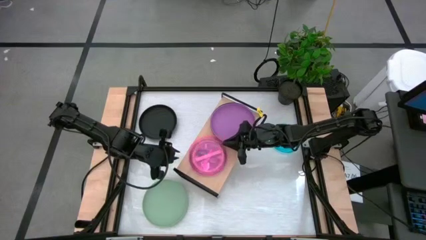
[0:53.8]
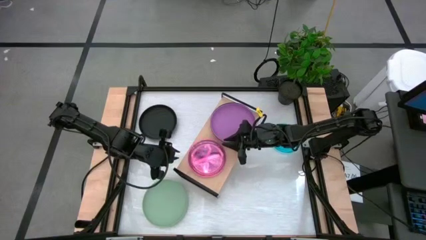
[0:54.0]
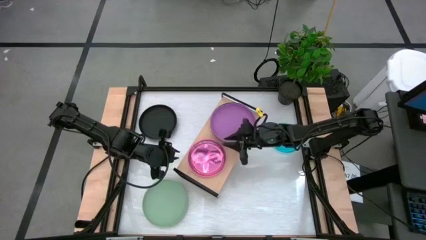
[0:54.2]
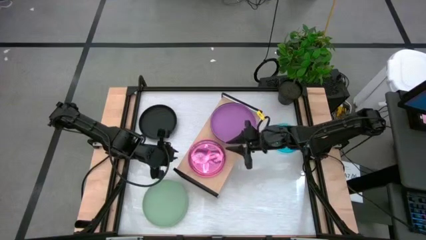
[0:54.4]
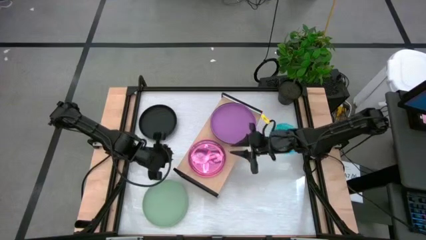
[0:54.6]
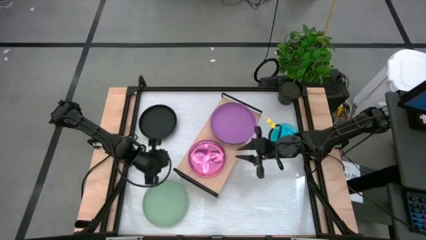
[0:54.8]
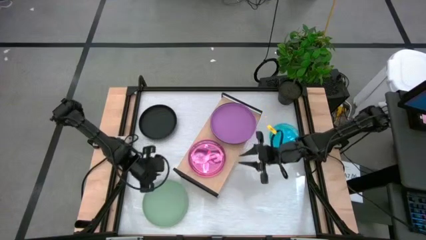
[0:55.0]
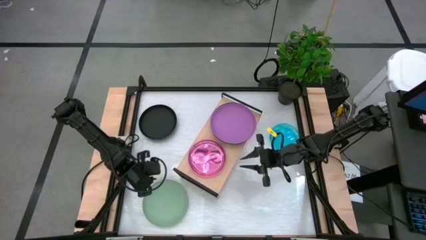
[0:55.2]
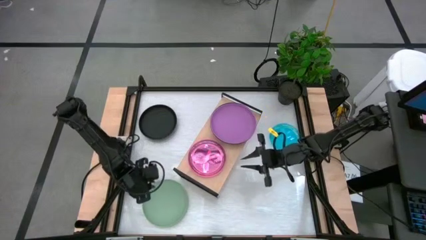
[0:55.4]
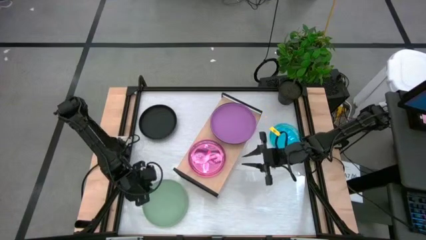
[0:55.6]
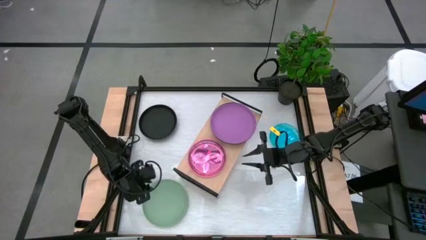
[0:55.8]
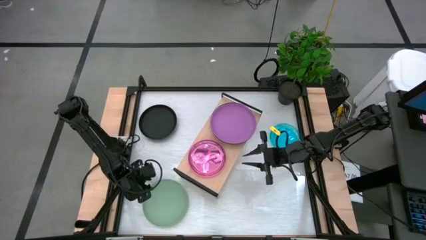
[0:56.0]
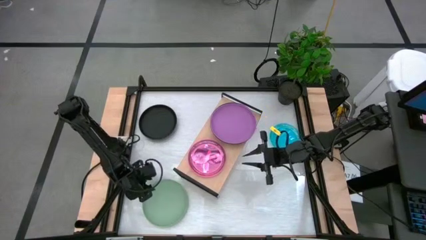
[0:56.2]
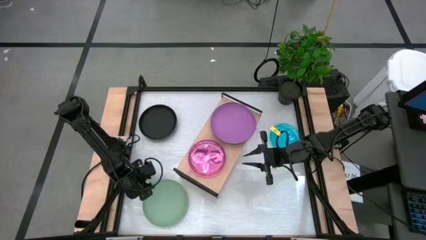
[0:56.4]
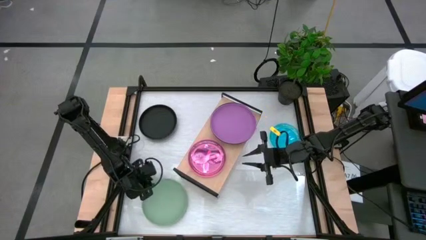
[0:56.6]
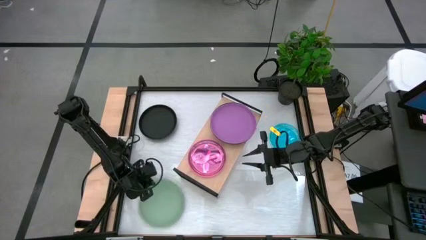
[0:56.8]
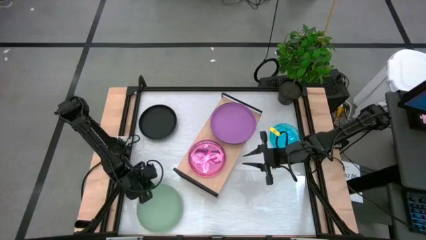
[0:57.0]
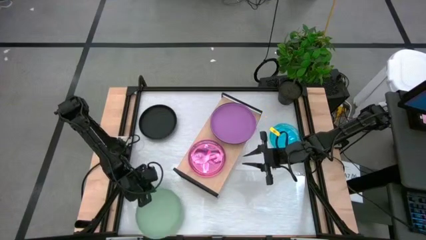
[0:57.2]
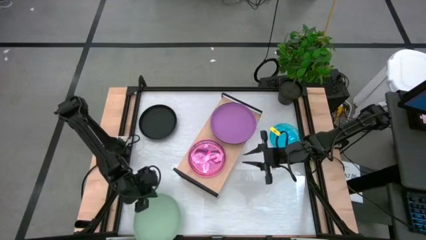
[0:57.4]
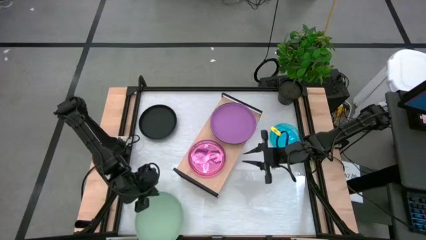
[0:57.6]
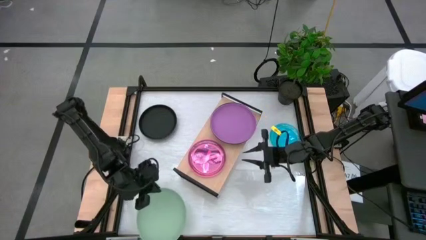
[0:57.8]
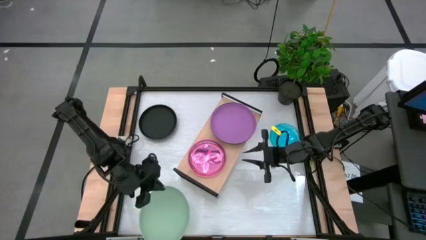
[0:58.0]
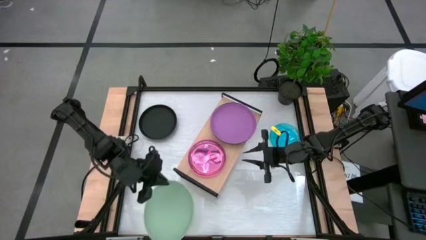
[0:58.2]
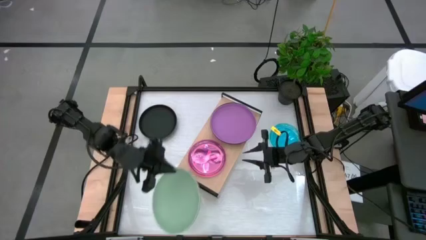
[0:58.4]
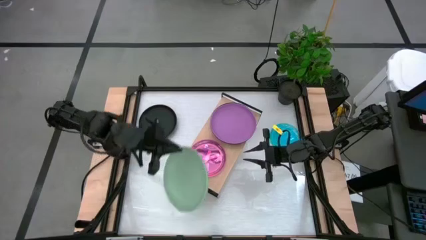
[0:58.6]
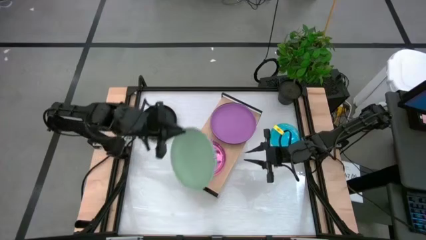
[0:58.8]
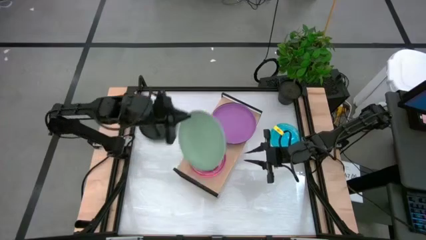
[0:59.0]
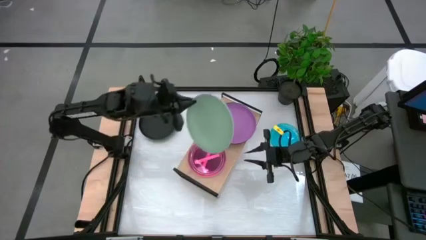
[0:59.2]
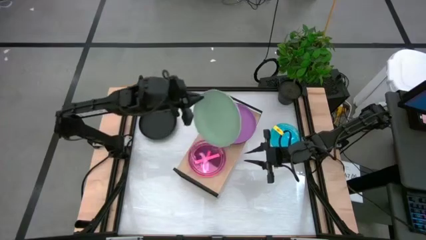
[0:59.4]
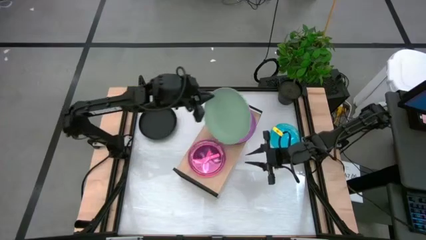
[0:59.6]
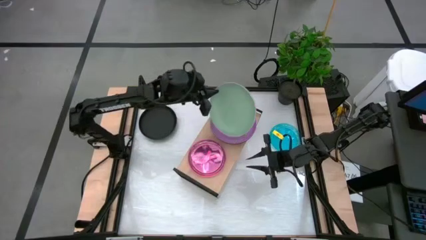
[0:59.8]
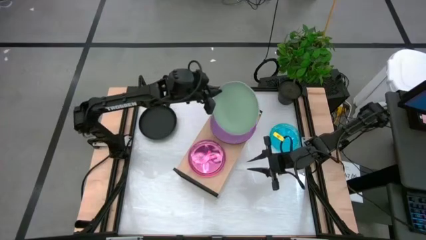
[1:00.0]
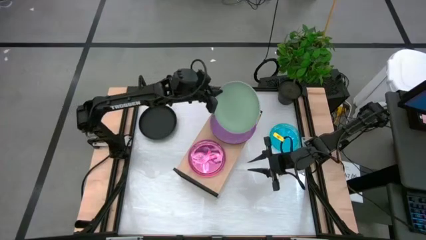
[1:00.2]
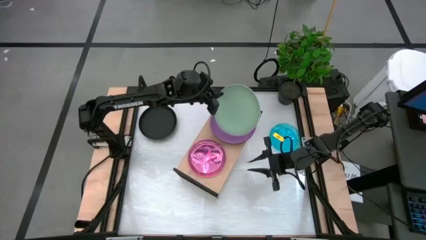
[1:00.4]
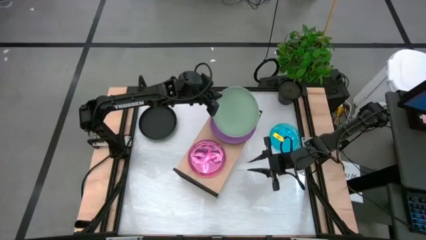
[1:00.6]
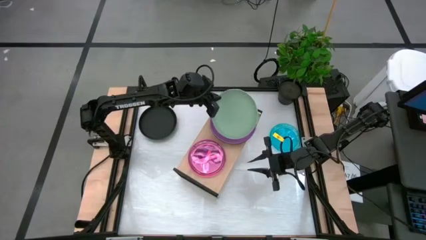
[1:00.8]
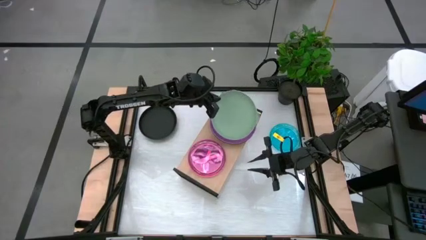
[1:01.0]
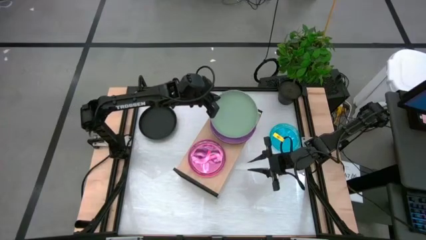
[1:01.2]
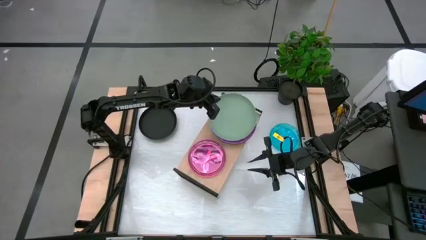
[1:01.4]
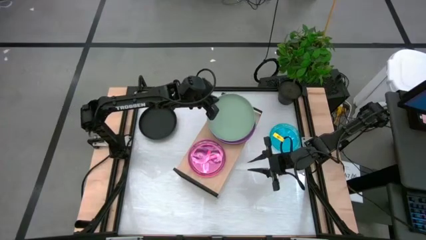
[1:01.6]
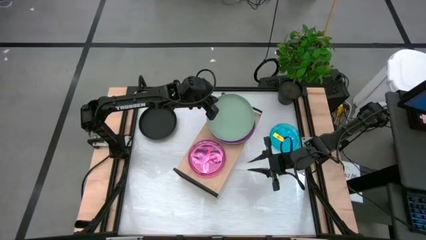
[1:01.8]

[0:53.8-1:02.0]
Task: Place and stack plates onto a shelf
Stack the big green plate on top of the big violet plate

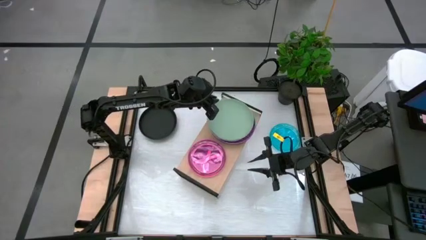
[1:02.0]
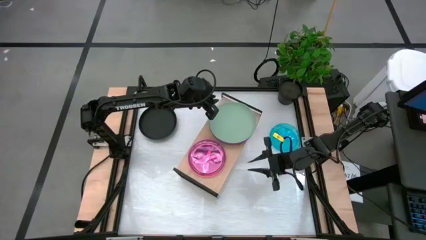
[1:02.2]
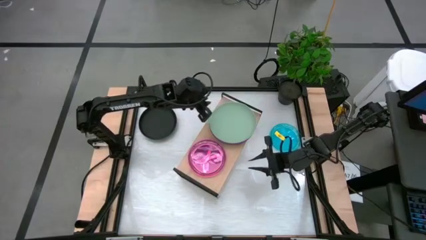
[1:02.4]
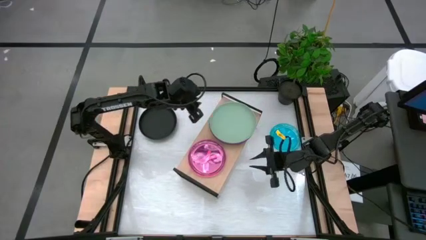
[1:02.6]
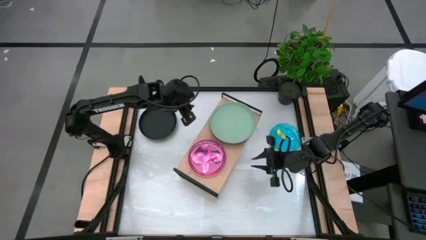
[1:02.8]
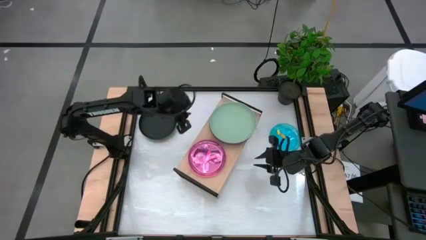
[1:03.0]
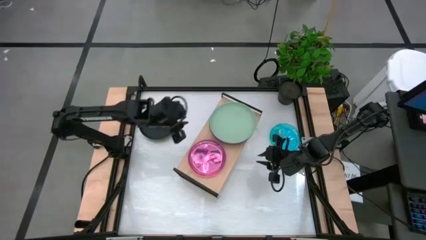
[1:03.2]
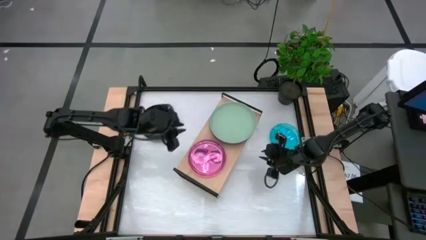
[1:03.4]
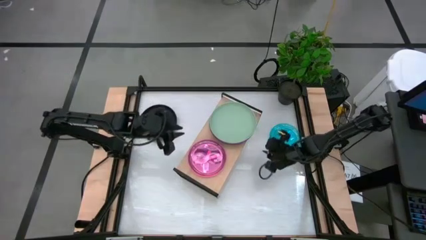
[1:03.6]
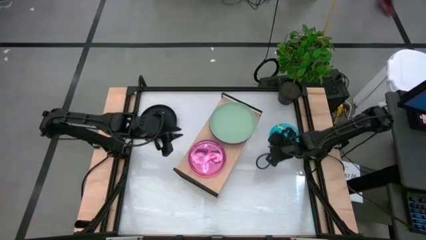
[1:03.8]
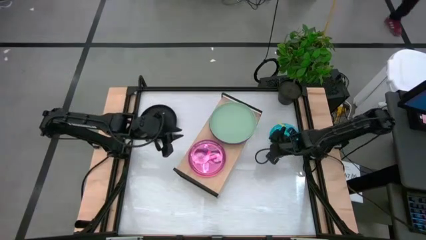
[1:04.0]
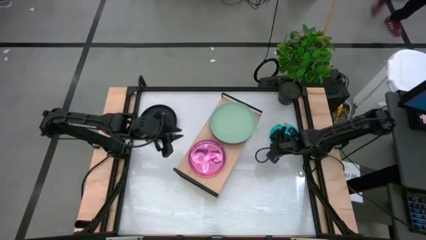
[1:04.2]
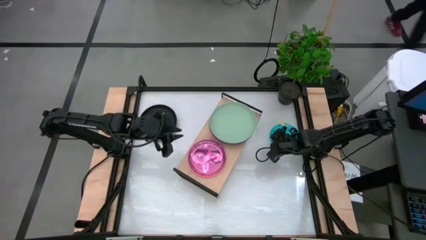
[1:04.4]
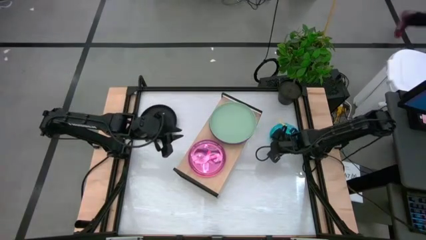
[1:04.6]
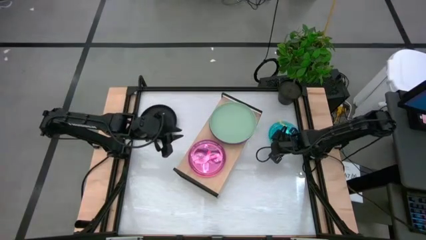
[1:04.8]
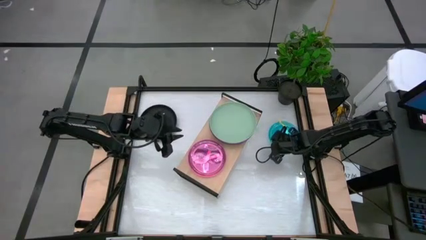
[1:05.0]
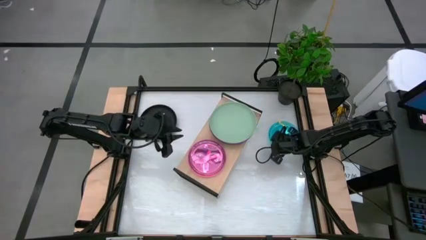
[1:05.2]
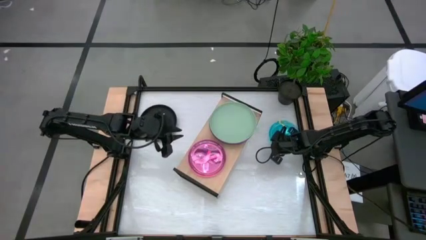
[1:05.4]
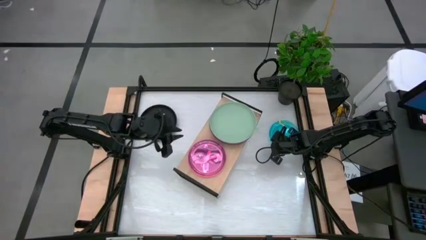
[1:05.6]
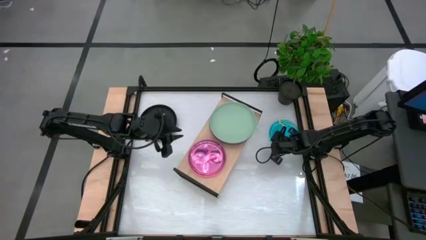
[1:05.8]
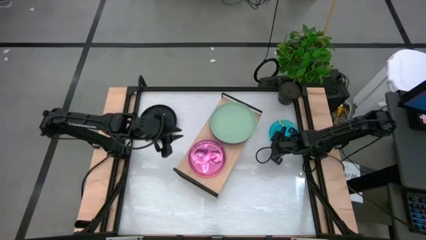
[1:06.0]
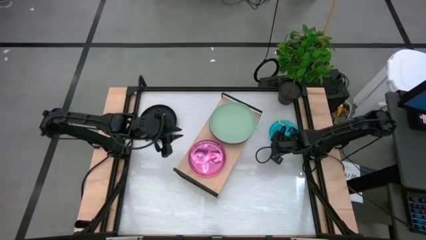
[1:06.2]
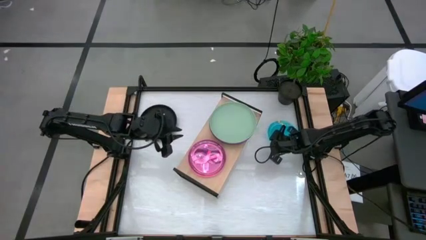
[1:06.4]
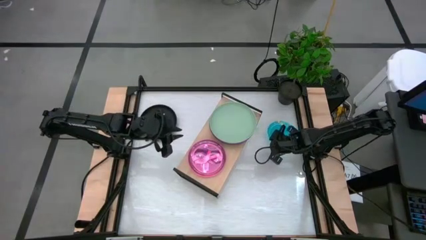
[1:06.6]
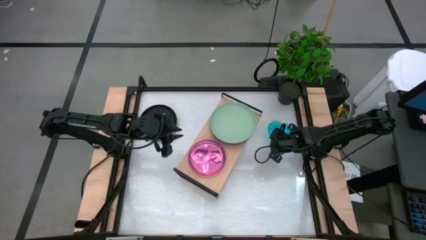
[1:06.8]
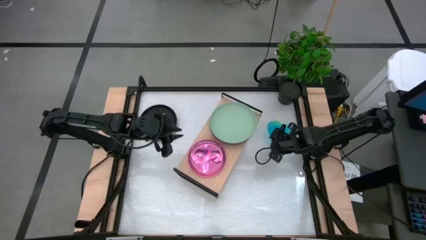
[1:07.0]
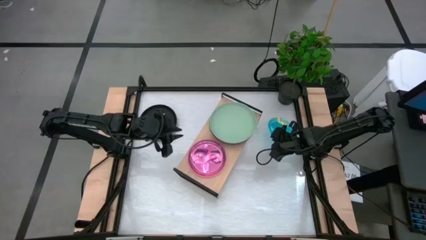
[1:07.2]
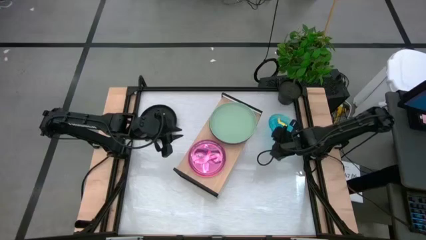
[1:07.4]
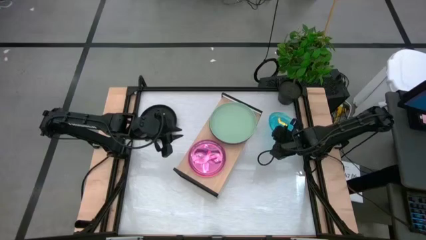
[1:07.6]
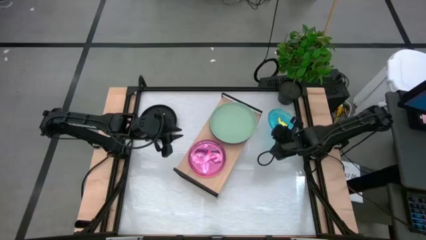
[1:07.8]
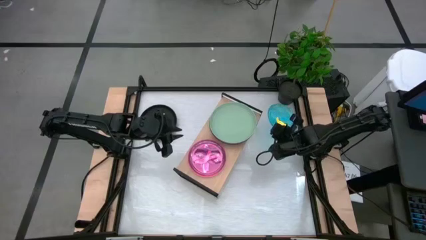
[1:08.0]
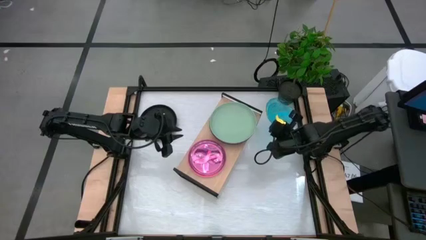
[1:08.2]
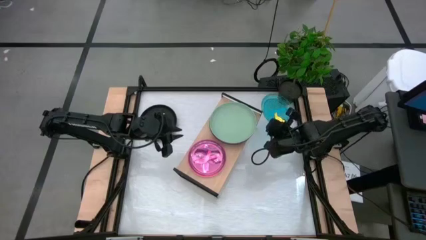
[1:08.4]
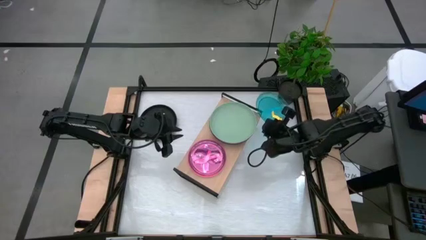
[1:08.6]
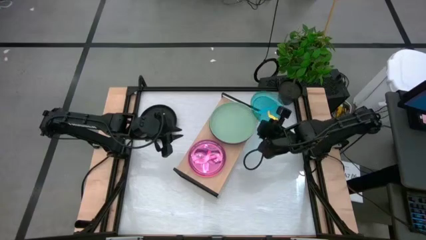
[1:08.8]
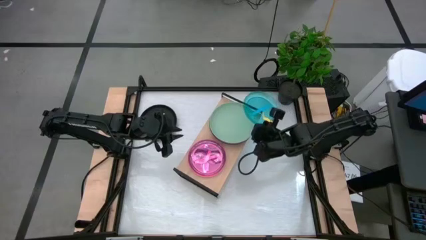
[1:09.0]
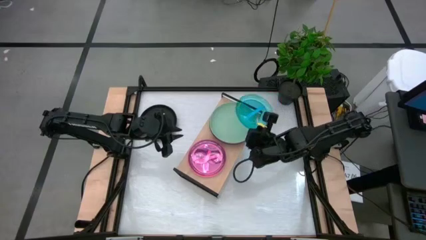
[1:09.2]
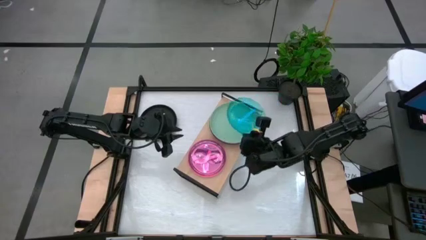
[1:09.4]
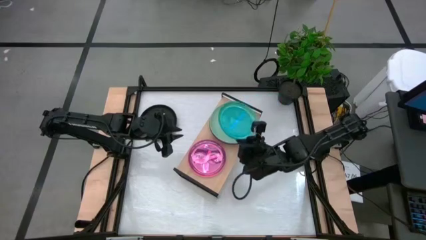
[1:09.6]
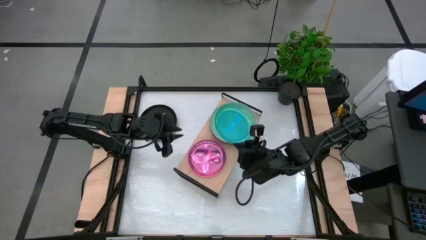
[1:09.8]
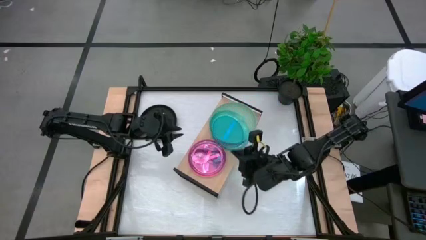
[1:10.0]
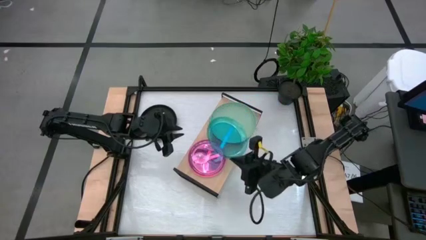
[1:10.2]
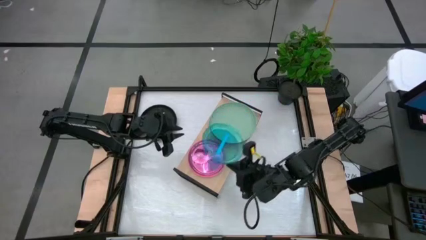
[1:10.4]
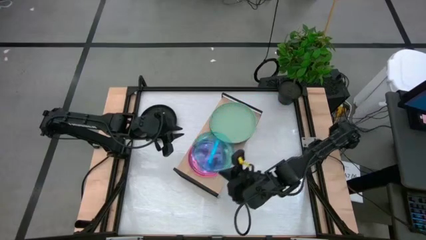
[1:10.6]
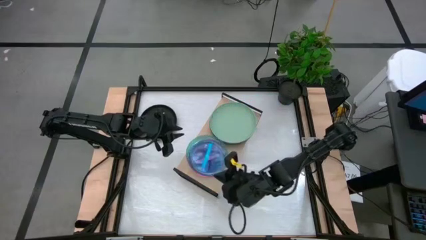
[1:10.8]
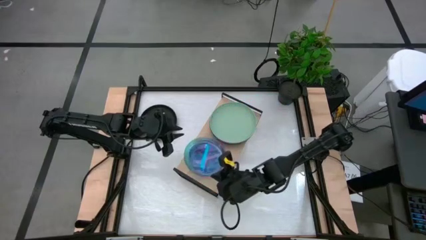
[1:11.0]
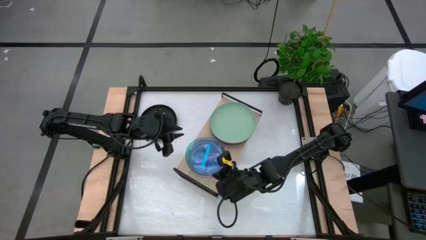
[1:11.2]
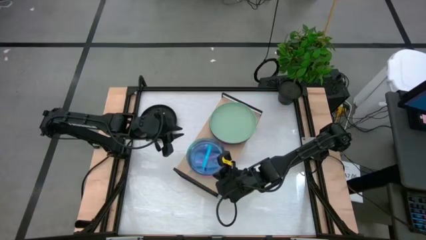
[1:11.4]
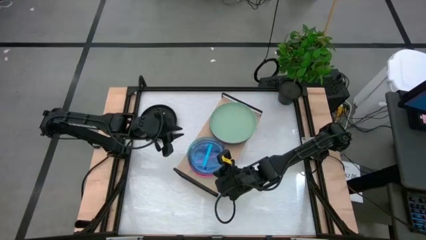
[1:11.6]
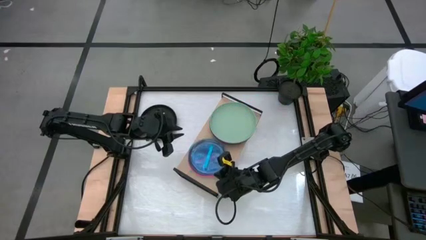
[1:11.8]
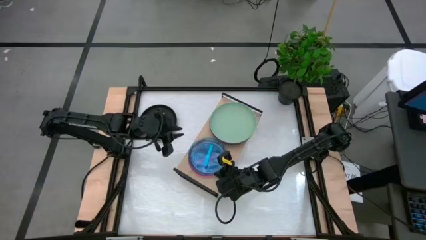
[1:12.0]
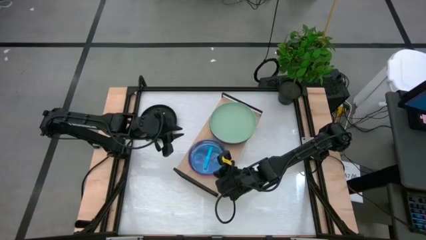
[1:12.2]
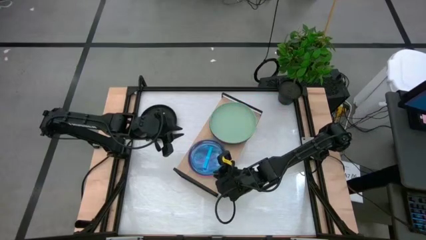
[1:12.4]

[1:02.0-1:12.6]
Stack the small transparent blue plate on top of the small transparent pink plate
